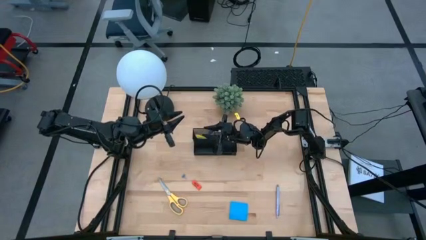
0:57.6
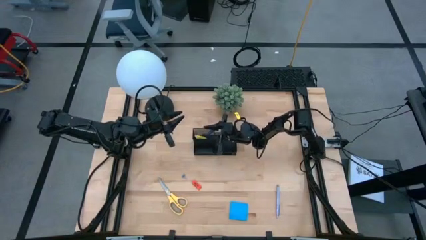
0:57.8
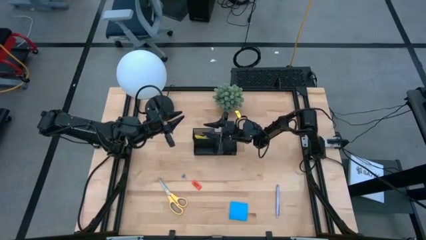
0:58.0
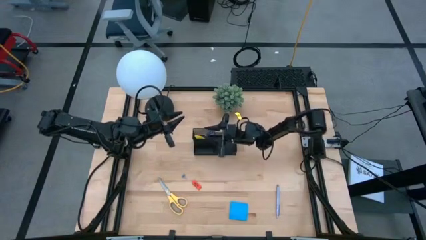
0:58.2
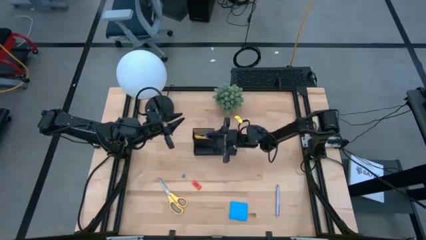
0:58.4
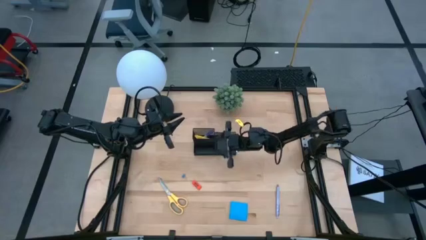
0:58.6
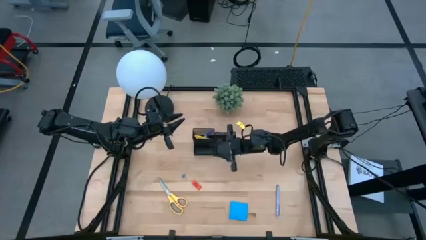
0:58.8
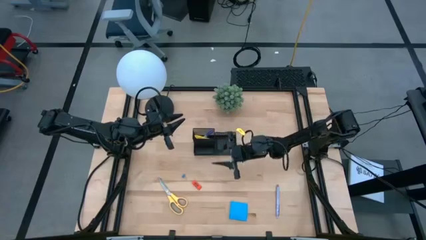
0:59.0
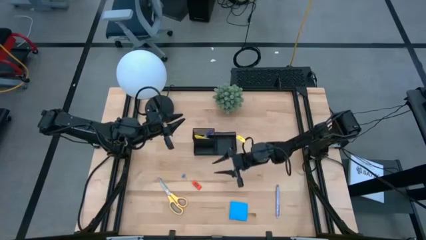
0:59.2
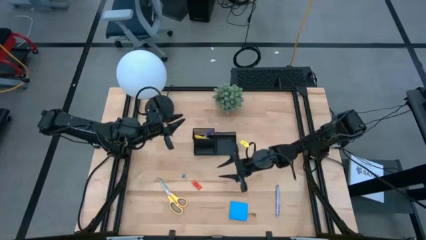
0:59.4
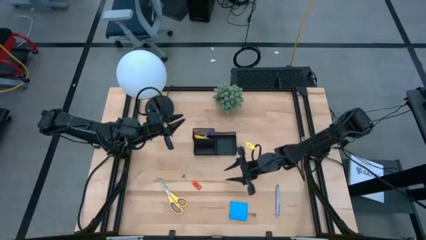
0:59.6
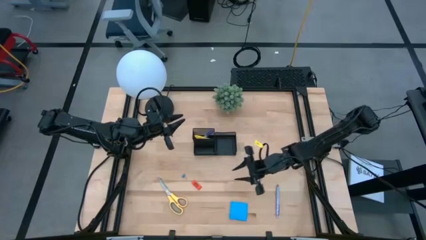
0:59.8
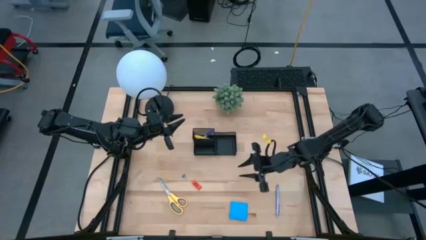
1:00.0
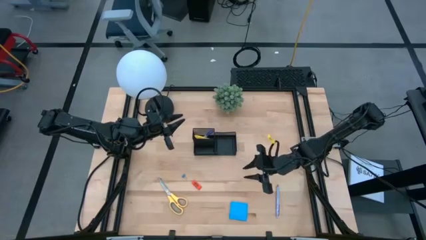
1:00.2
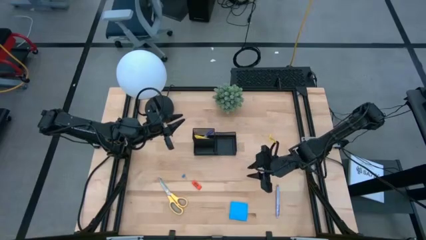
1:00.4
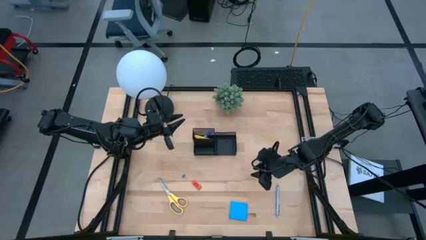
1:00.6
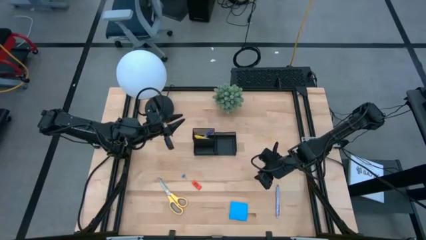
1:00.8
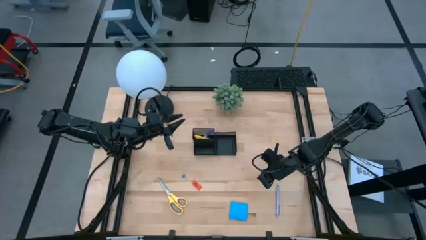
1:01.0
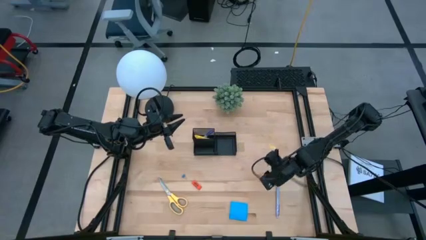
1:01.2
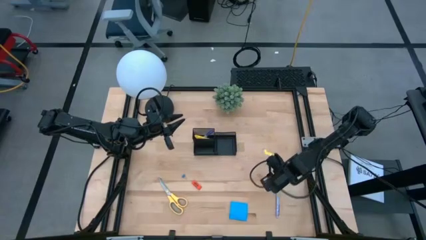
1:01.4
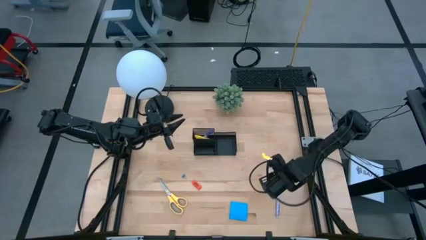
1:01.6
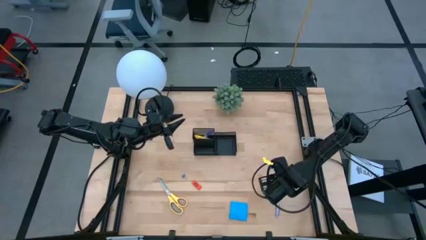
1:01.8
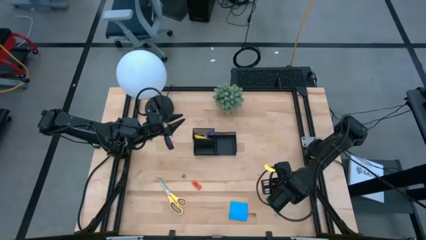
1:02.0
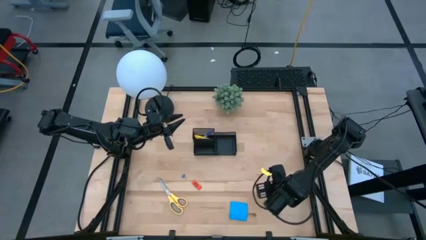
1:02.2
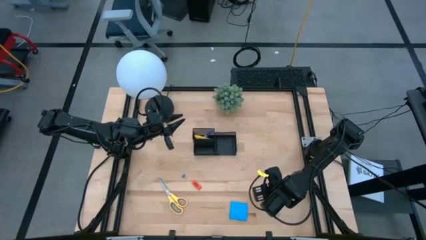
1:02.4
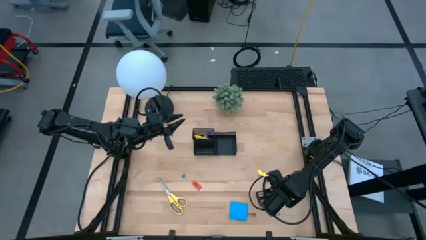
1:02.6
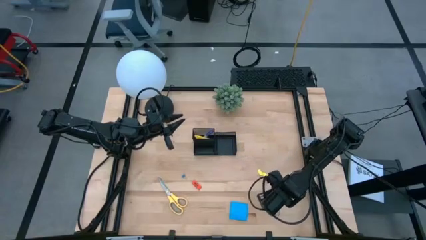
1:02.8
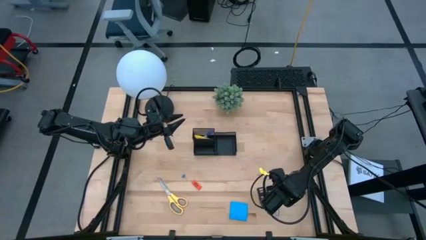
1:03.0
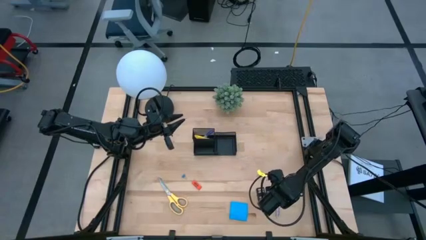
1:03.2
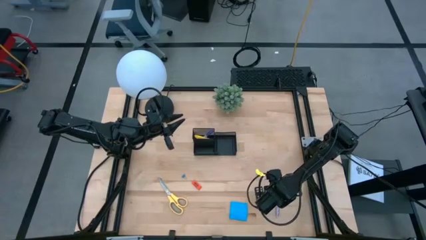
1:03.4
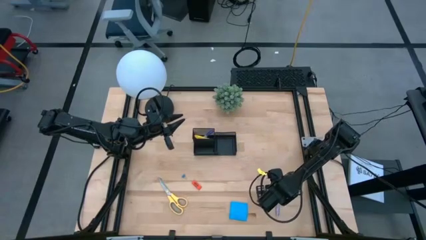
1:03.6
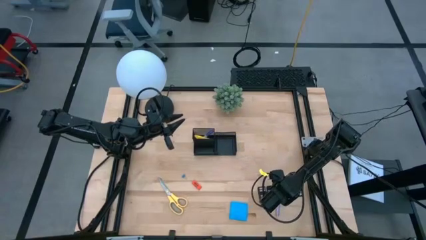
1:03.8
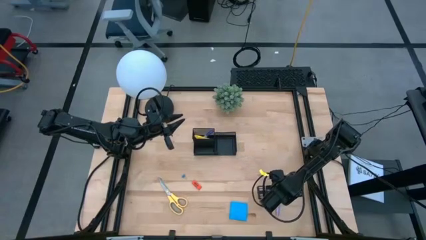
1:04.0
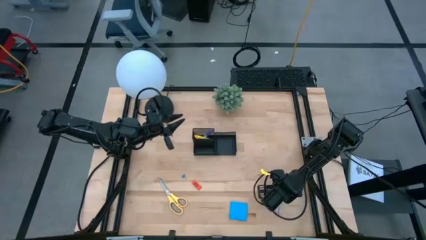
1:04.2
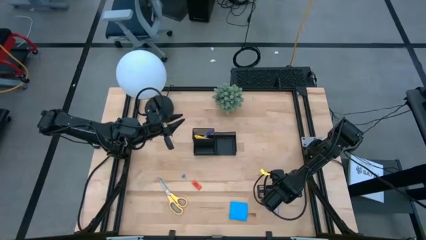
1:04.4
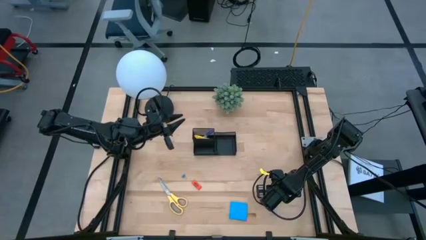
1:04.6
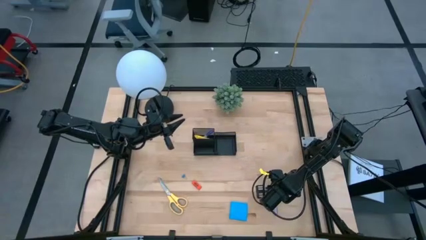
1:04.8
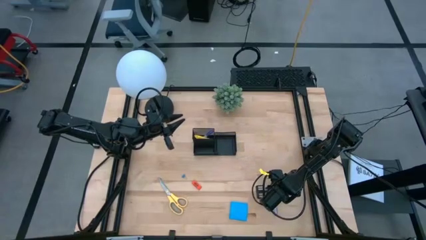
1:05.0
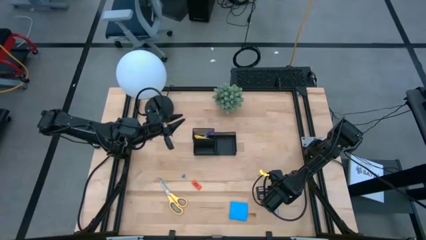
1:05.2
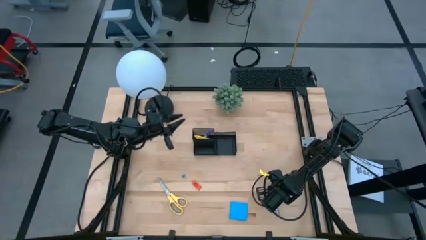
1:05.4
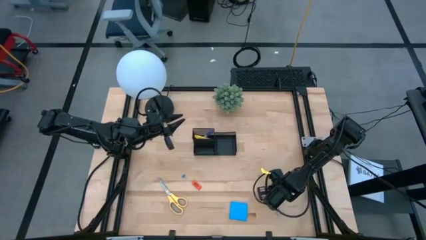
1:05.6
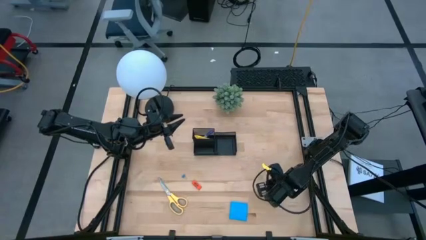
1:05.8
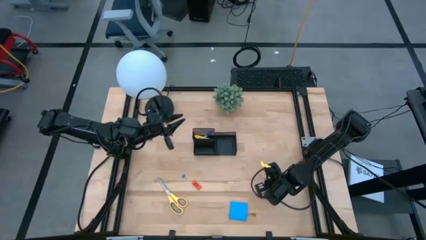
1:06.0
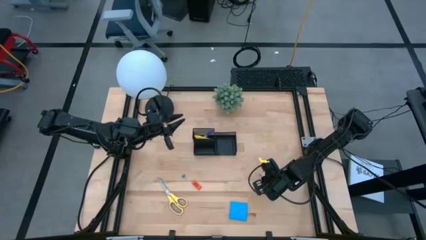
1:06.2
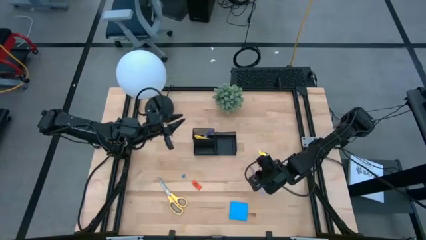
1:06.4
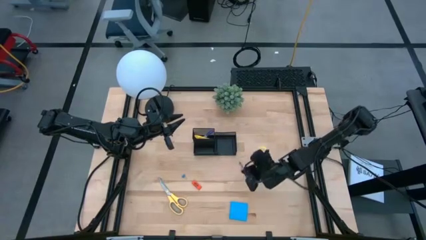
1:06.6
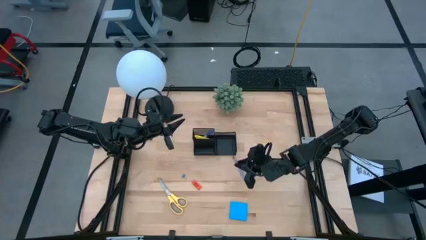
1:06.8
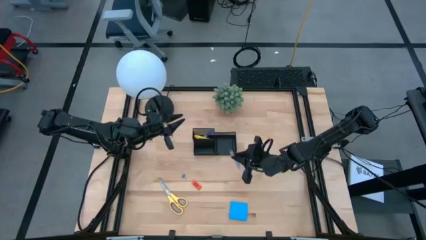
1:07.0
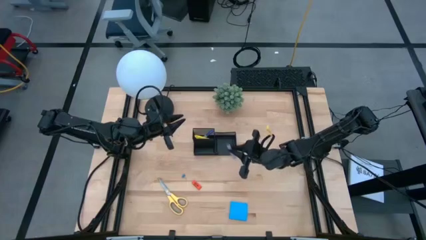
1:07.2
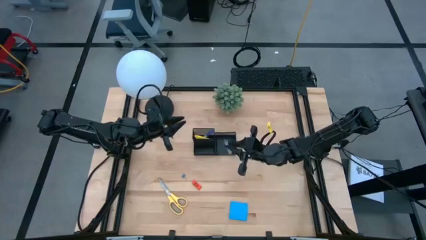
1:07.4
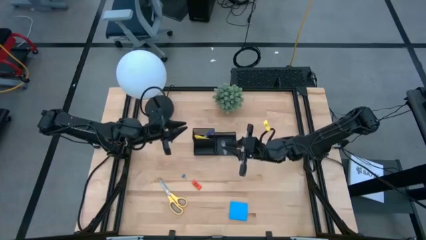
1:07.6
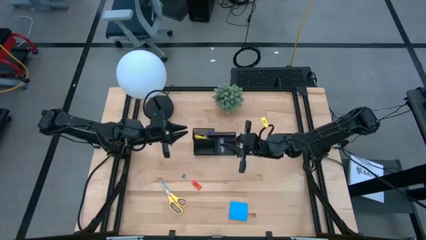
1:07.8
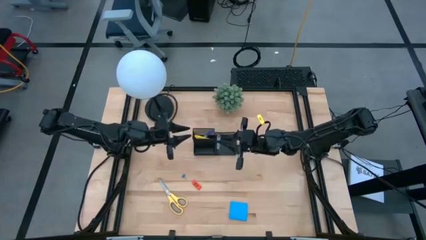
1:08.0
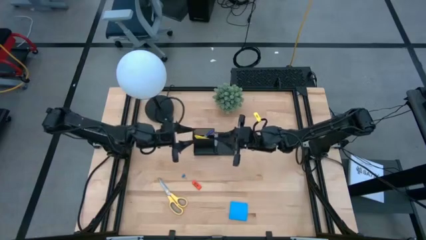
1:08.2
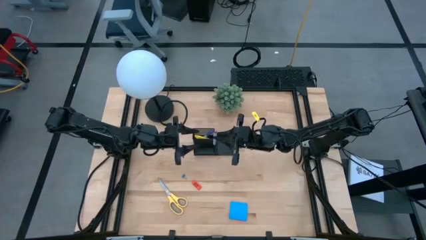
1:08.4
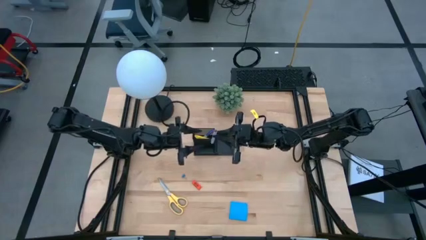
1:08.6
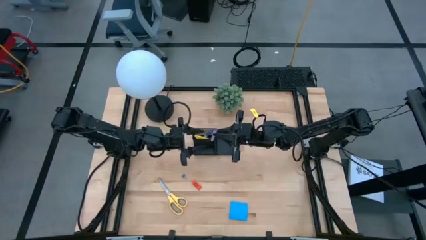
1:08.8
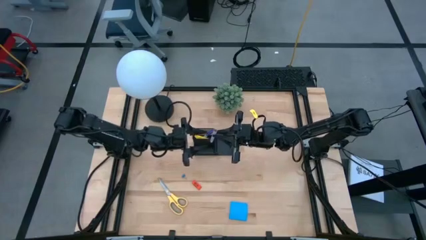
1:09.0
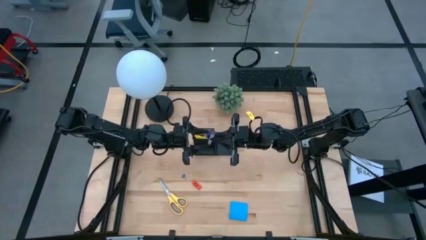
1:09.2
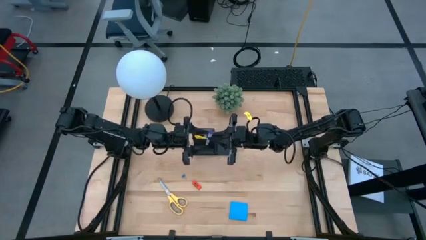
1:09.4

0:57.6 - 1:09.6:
Task: Pick and place office supplies into organizer
Put the purple pen into the desk organizer
